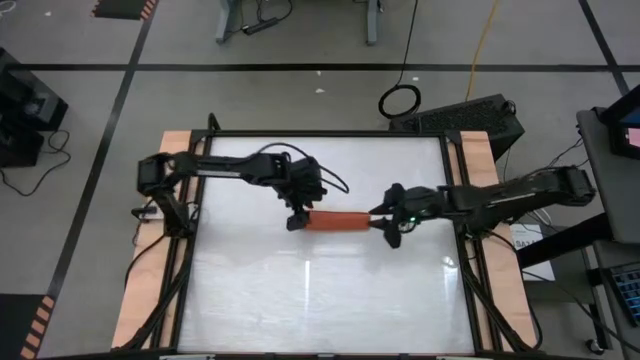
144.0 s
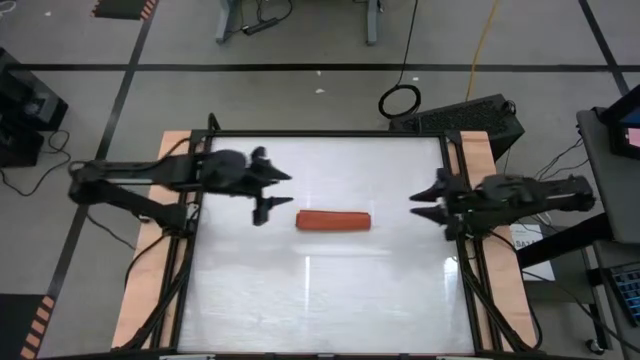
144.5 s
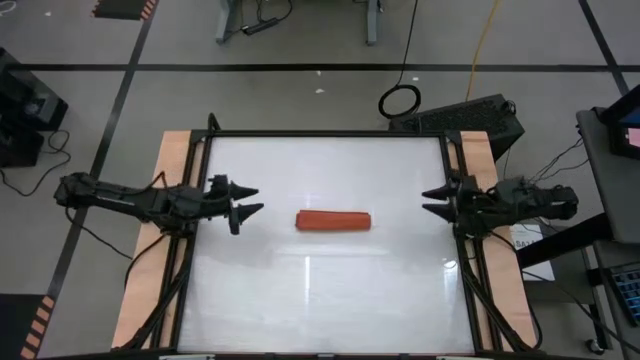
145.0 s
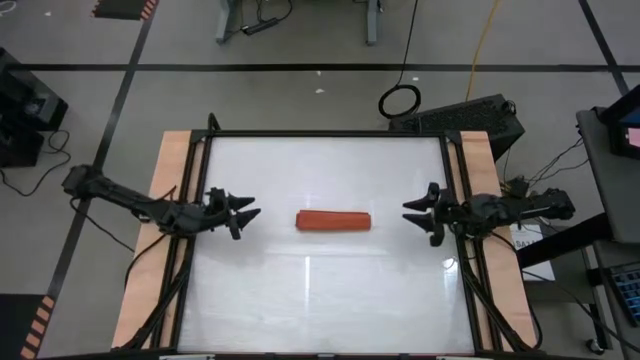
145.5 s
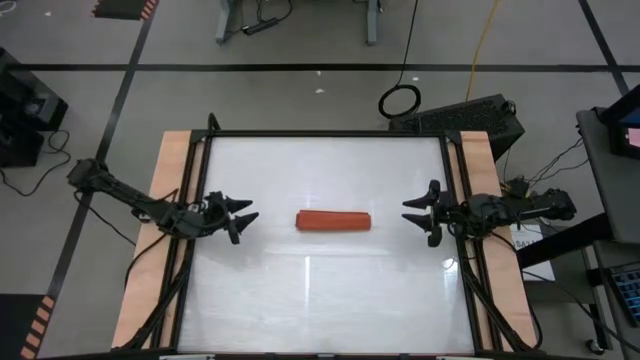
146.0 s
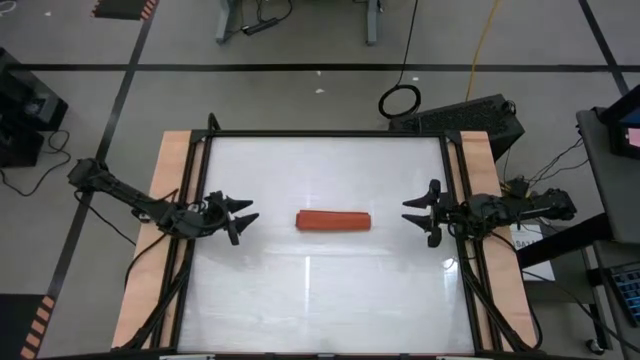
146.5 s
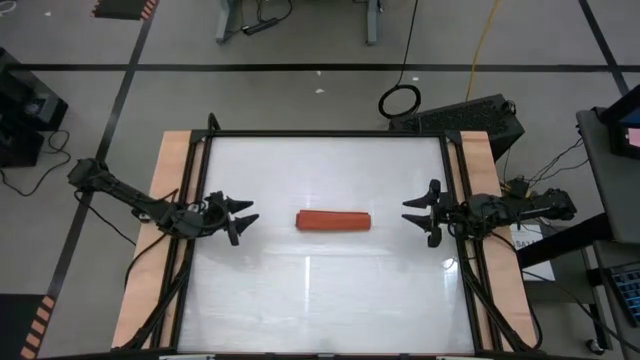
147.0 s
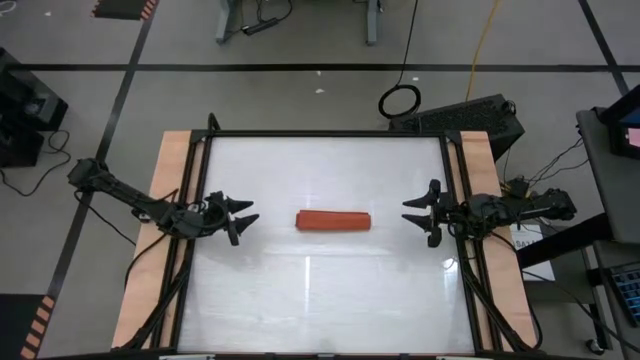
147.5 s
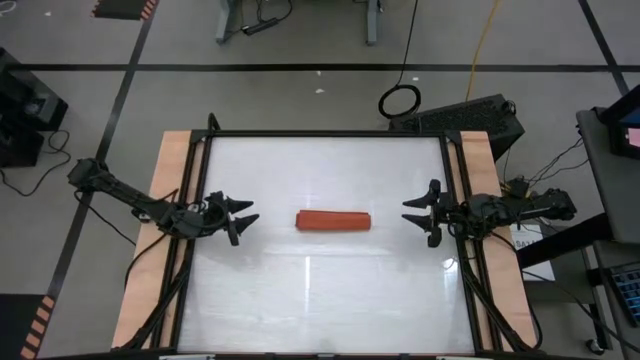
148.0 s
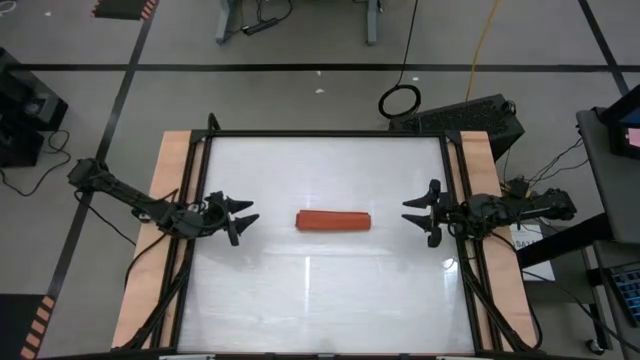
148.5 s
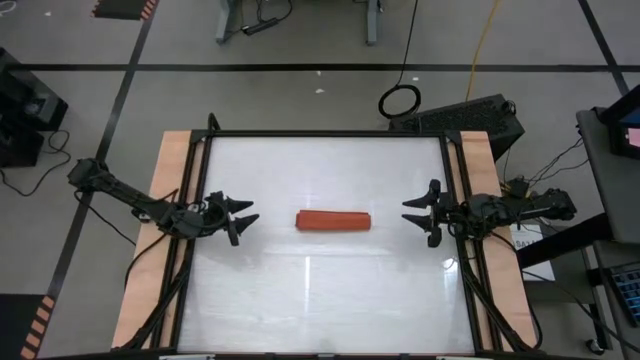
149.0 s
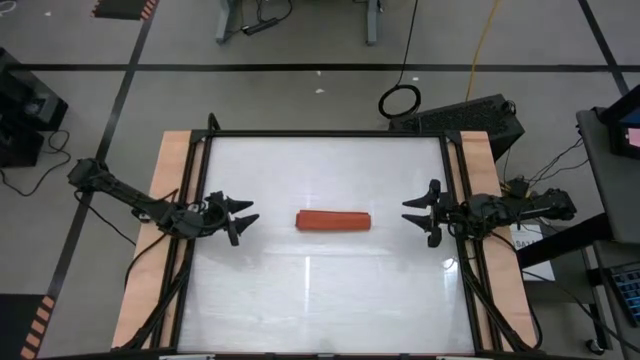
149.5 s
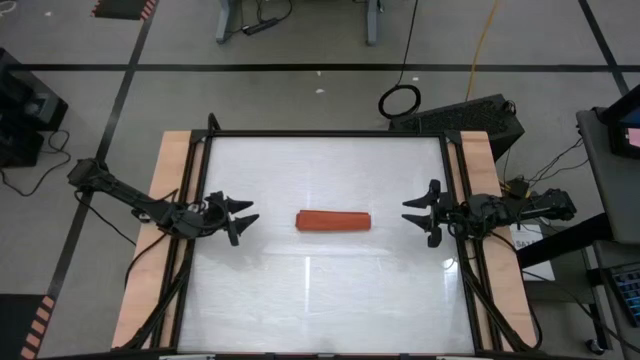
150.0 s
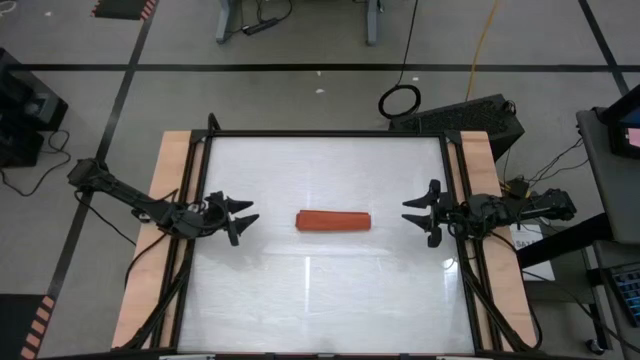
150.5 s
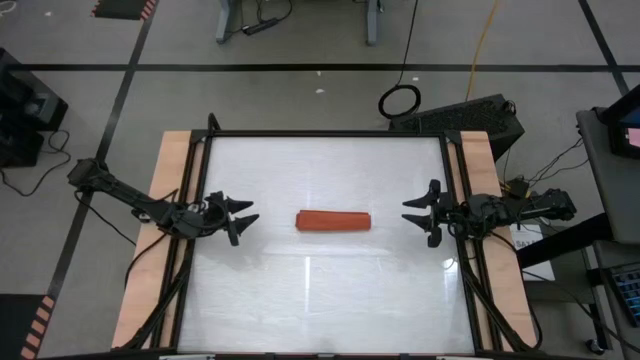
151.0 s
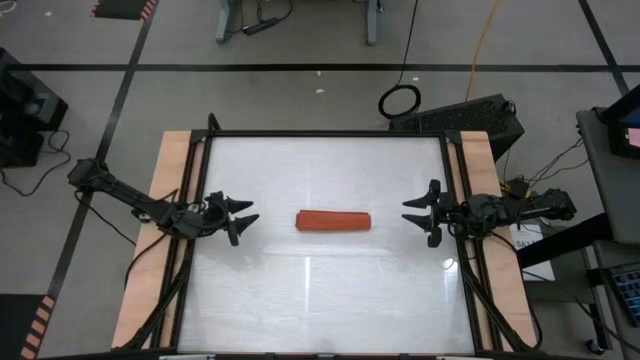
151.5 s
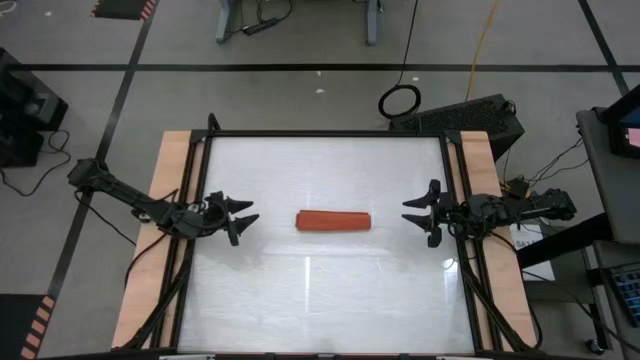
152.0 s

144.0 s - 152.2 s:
Task: Roll towel into tight, uniform cylinder
Return to Home Position

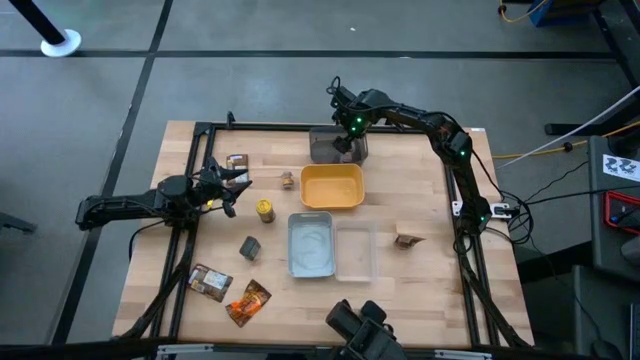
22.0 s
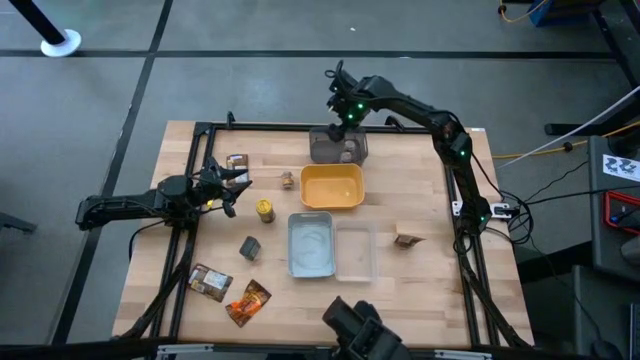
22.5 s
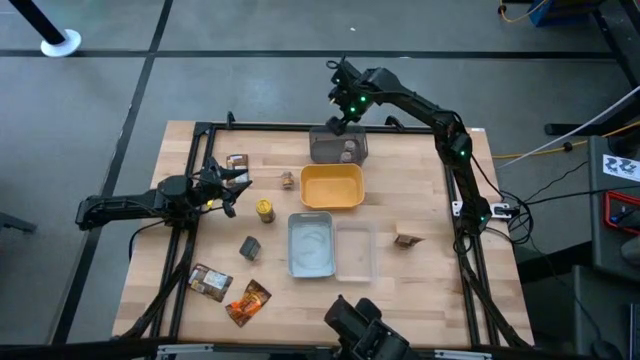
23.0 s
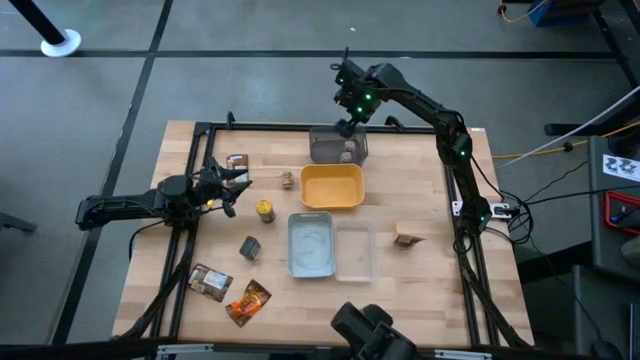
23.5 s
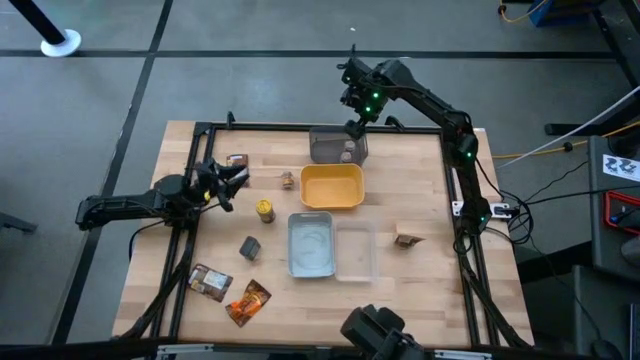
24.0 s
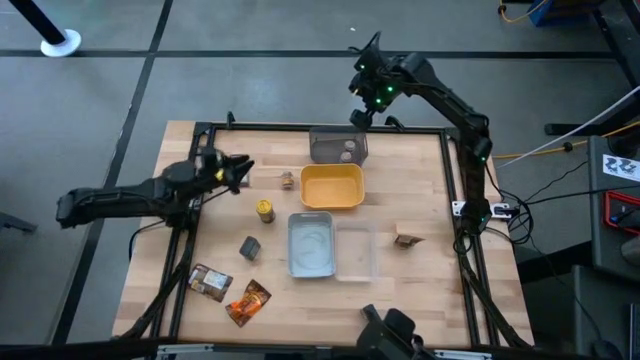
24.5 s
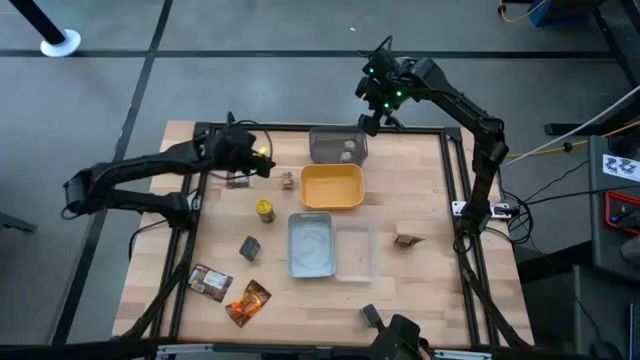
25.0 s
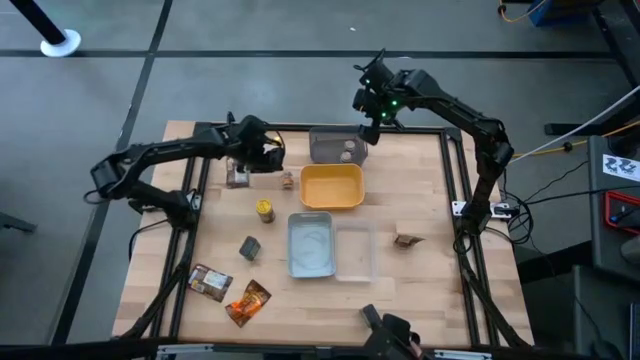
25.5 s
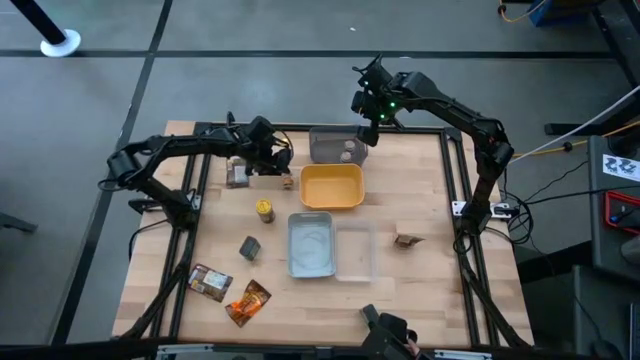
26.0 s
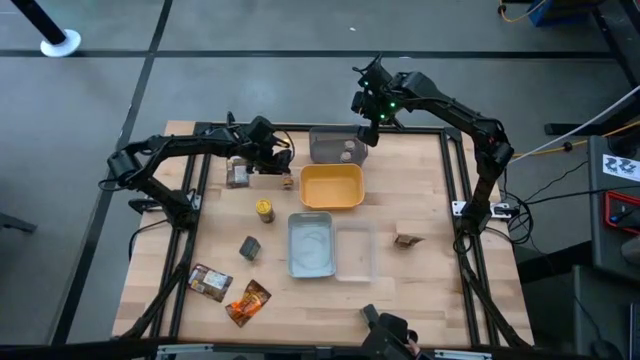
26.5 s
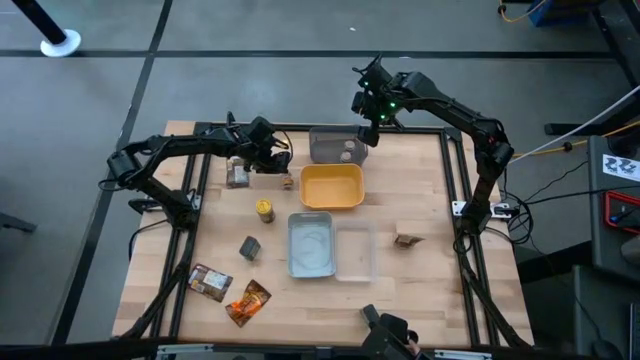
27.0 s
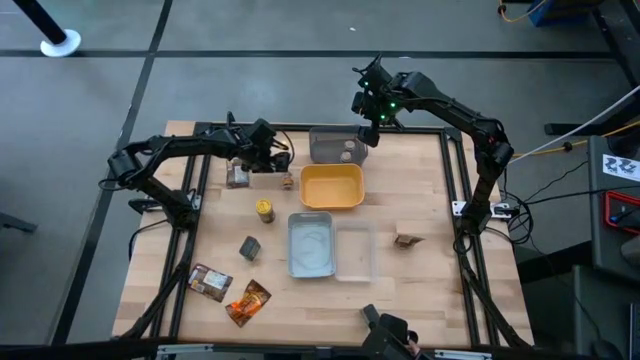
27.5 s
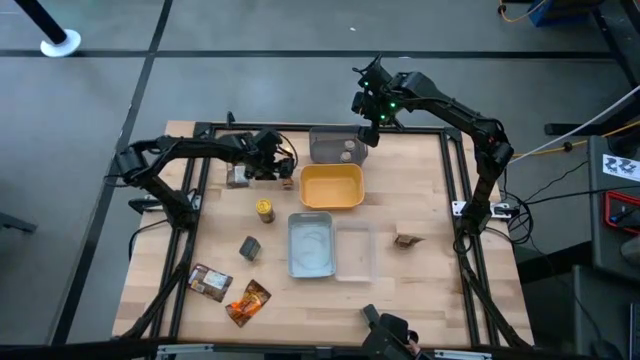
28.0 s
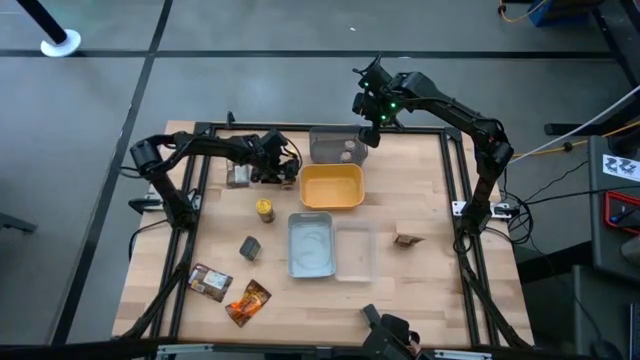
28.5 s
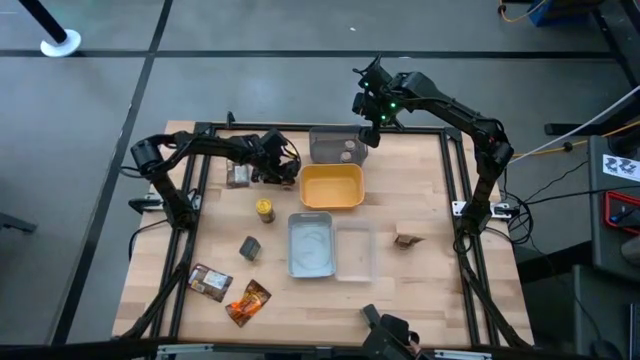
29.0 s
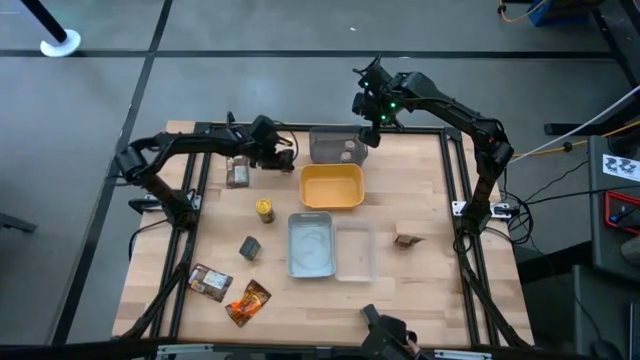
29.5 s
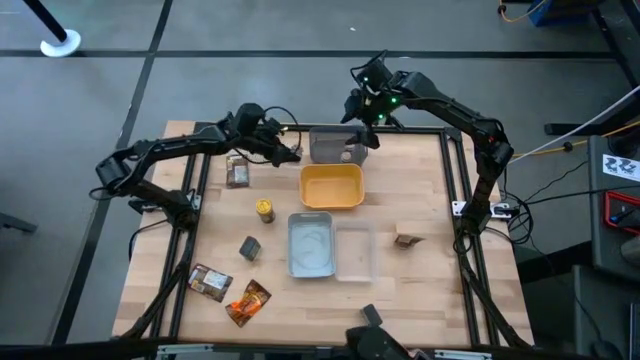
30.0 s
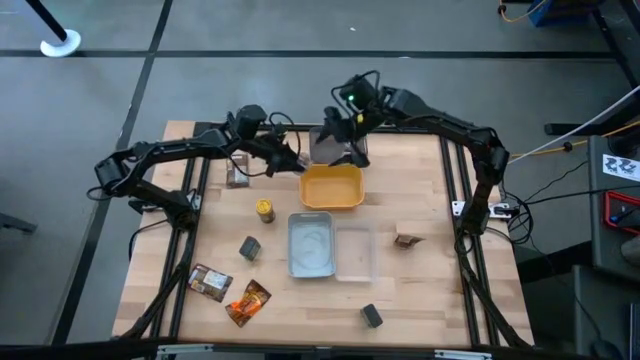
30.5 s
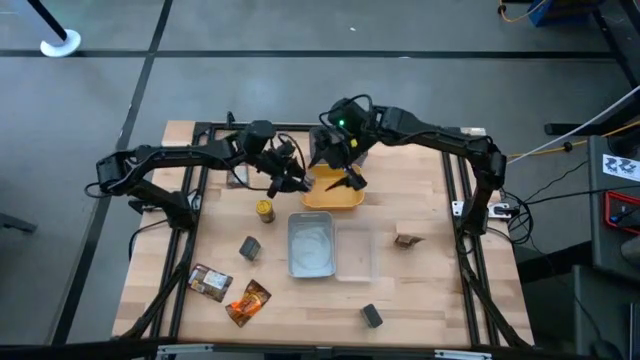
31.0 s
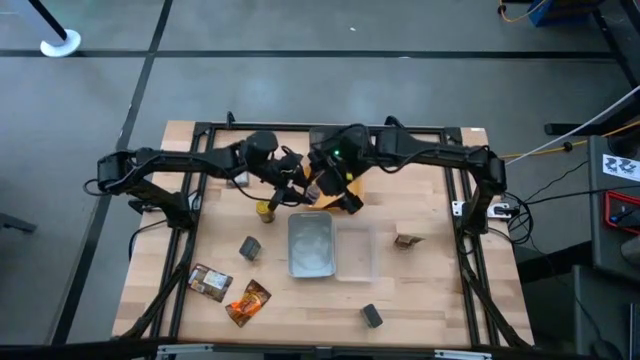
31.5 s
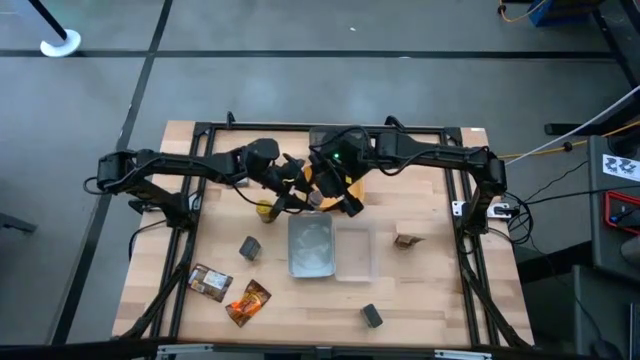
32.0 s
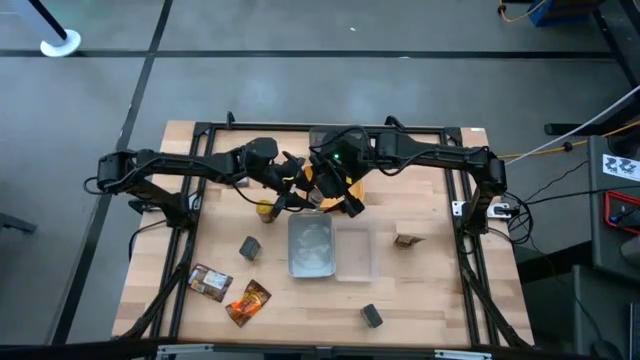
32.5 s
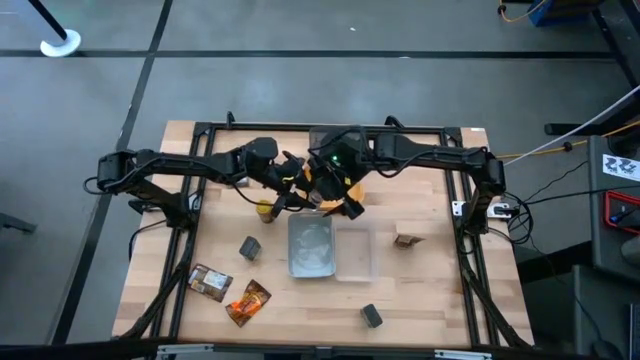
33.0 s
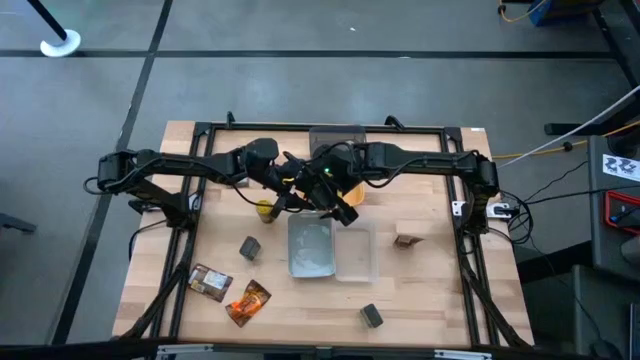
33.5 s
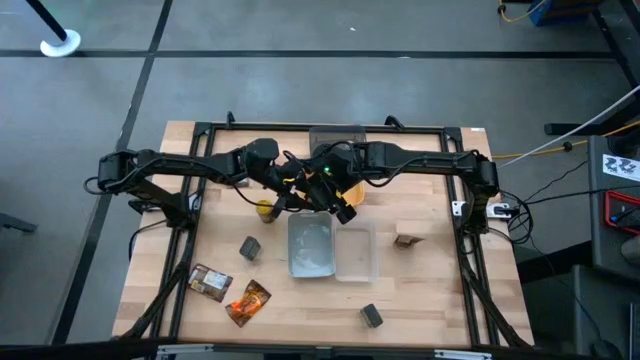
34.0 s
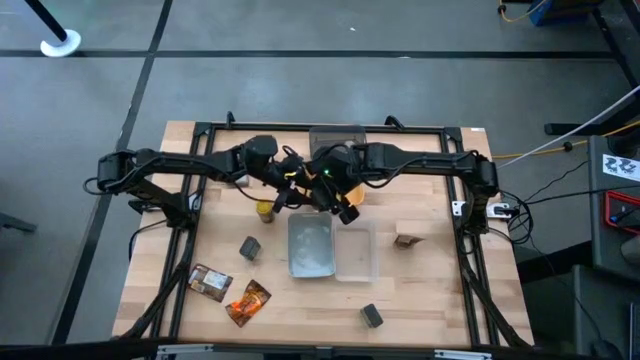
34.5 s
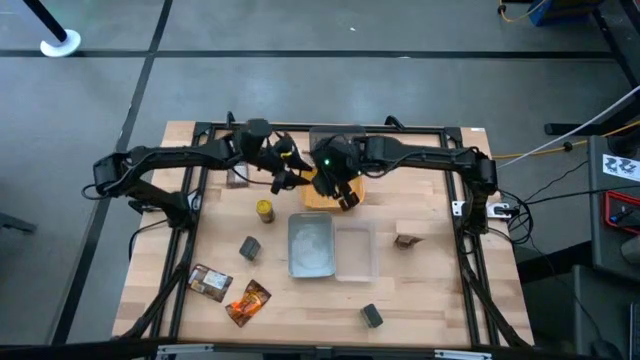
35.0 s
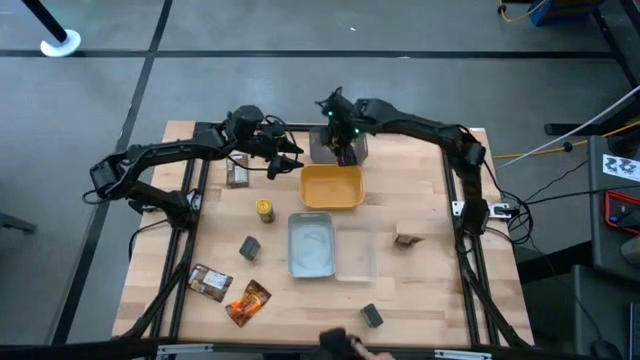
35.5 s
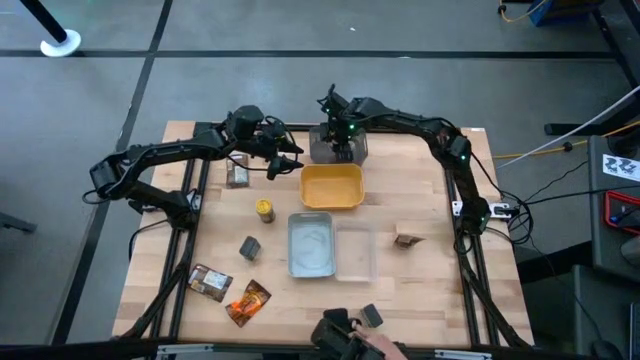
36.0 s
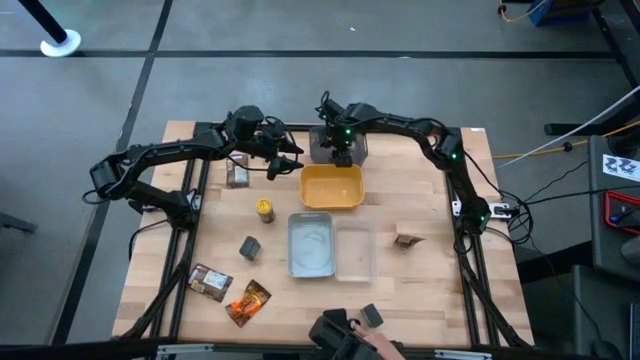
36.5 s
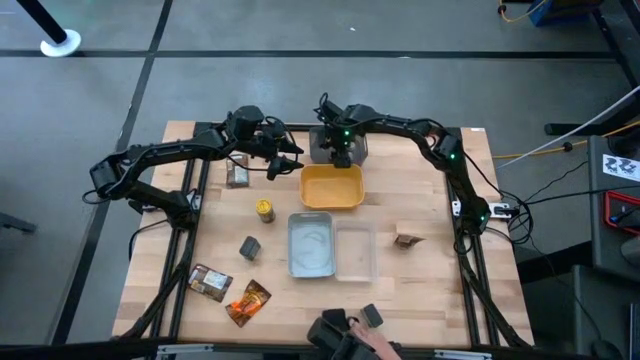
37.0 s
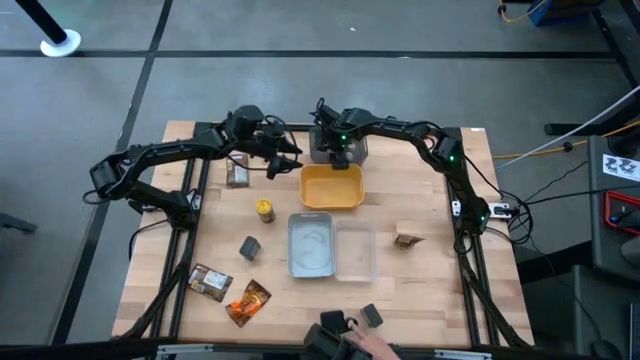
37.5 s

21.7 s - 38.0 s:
Task: Sort spices by type
Put the top brown seasoning bottle into the black transparent bin
